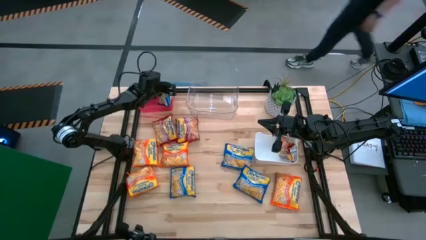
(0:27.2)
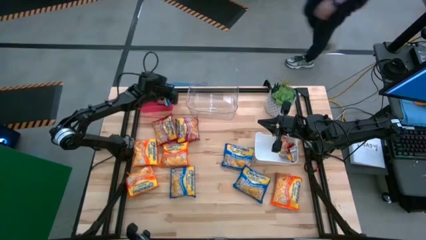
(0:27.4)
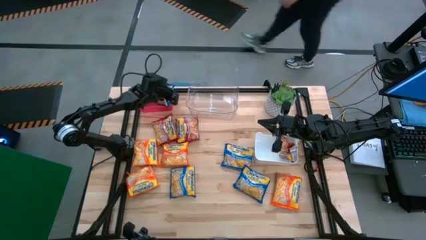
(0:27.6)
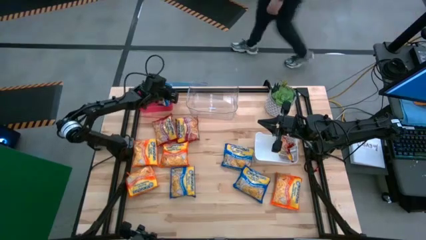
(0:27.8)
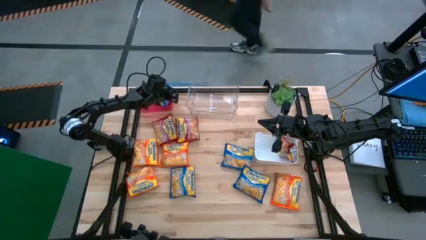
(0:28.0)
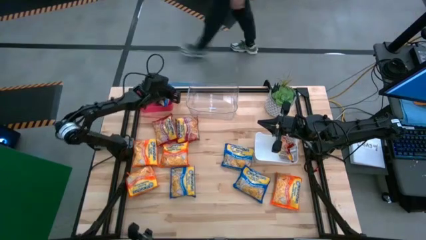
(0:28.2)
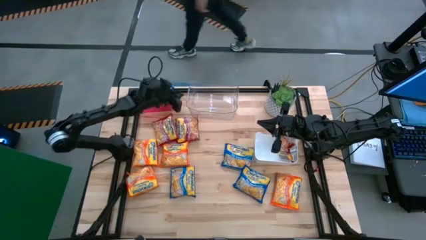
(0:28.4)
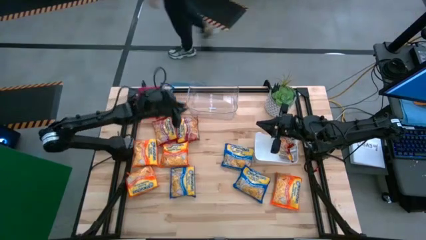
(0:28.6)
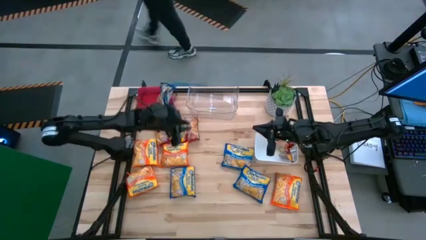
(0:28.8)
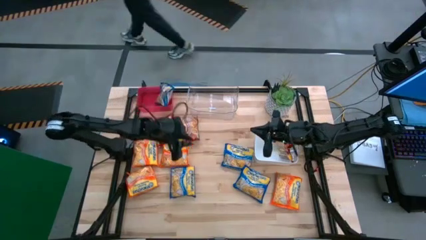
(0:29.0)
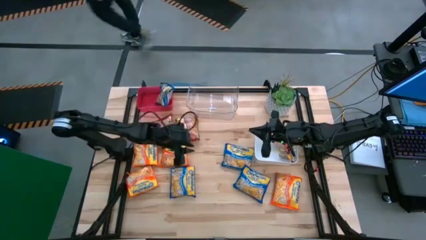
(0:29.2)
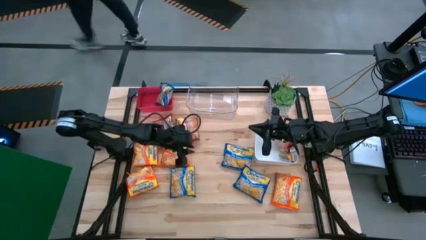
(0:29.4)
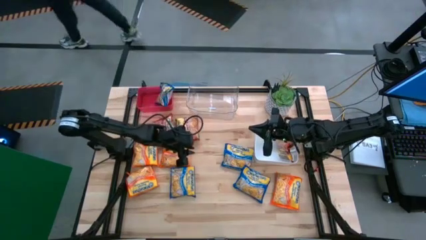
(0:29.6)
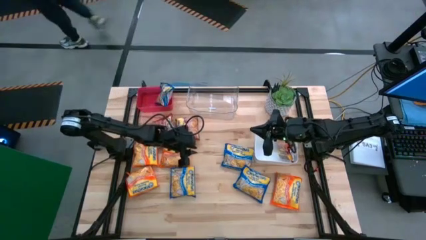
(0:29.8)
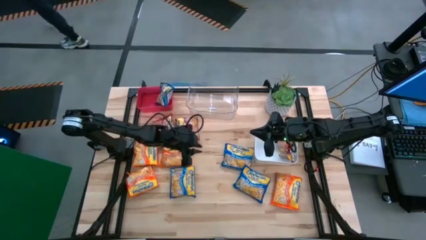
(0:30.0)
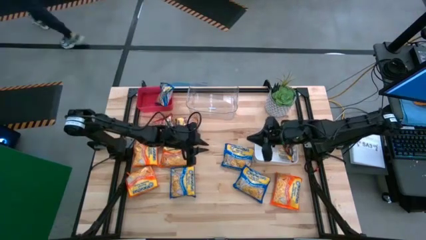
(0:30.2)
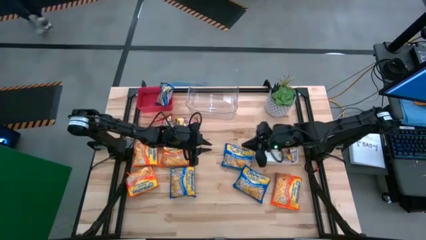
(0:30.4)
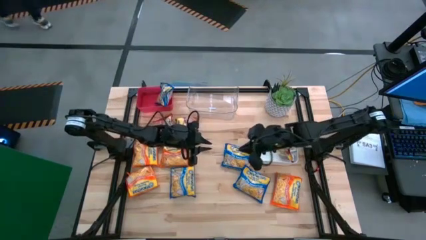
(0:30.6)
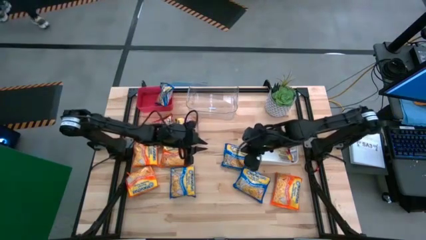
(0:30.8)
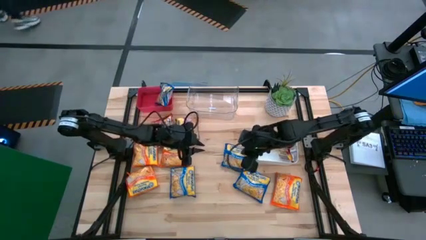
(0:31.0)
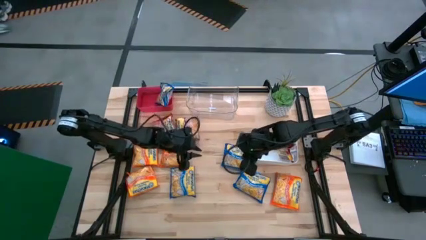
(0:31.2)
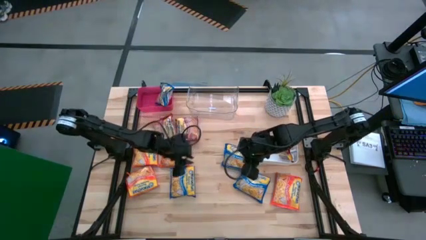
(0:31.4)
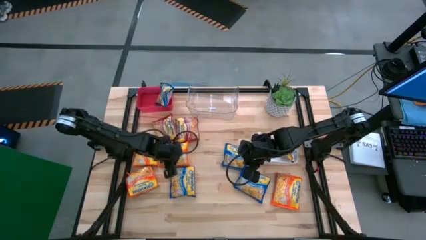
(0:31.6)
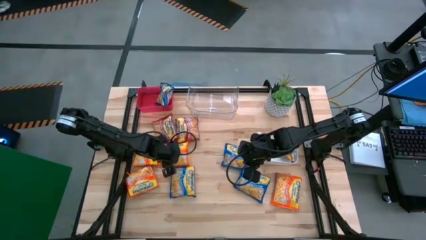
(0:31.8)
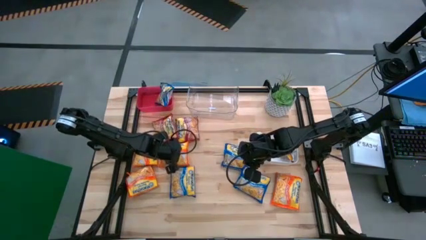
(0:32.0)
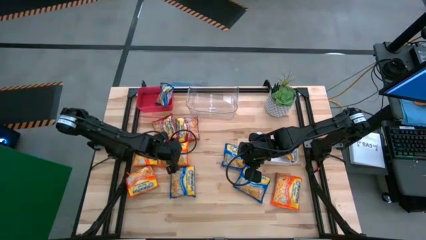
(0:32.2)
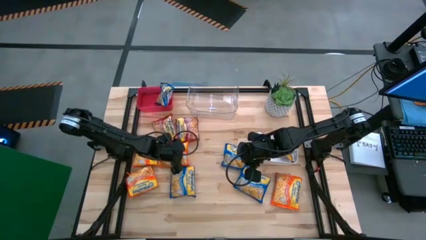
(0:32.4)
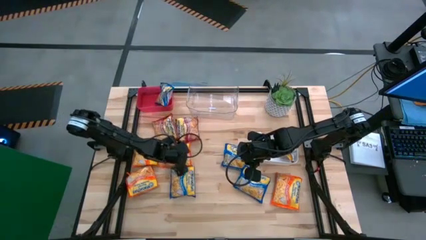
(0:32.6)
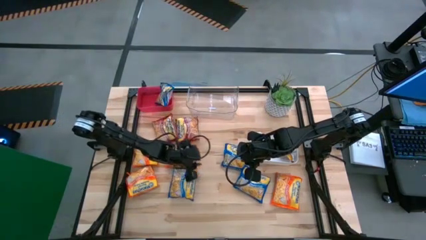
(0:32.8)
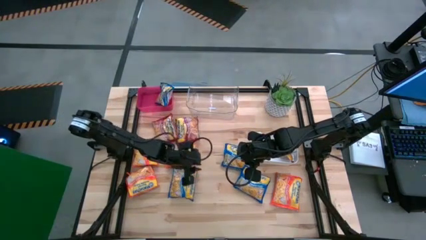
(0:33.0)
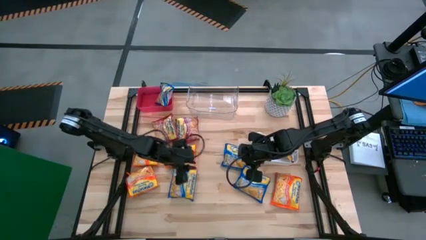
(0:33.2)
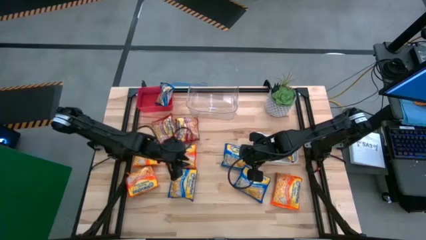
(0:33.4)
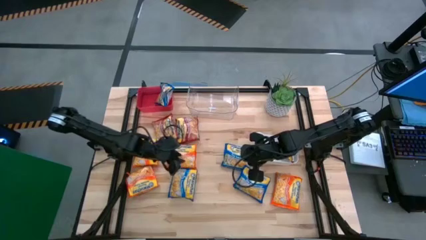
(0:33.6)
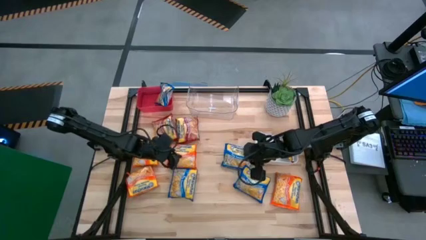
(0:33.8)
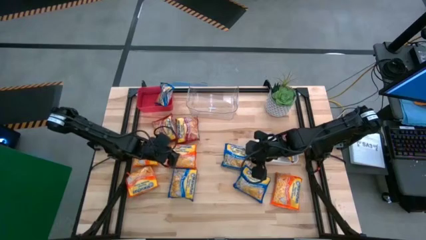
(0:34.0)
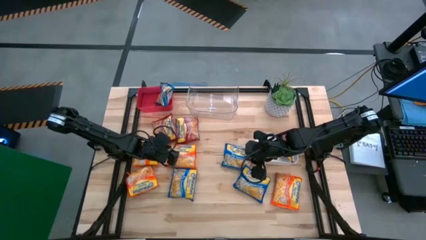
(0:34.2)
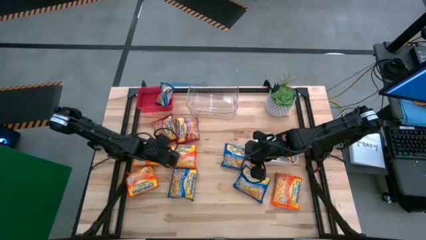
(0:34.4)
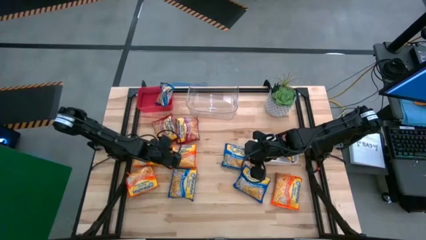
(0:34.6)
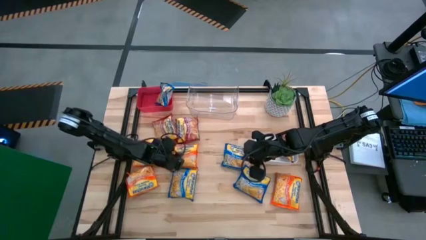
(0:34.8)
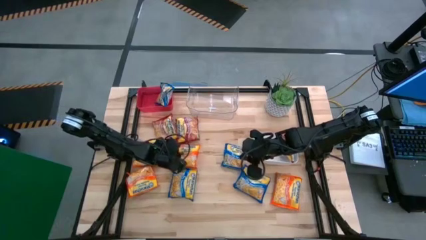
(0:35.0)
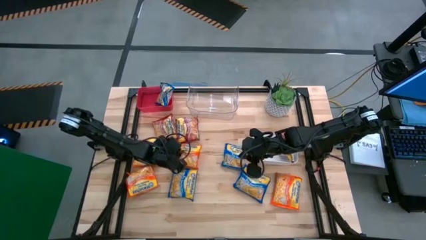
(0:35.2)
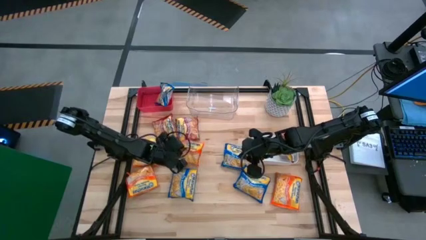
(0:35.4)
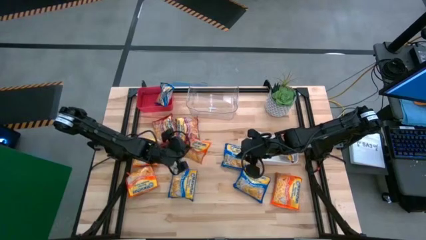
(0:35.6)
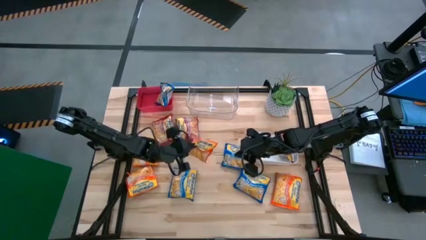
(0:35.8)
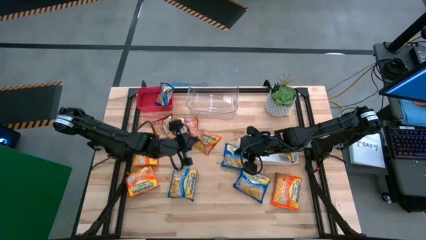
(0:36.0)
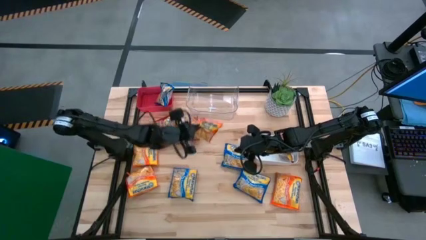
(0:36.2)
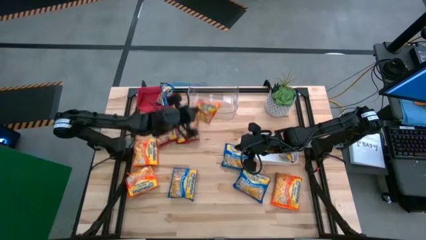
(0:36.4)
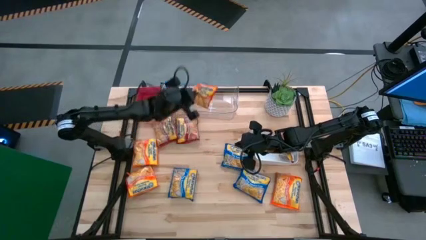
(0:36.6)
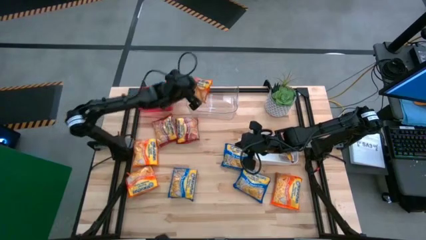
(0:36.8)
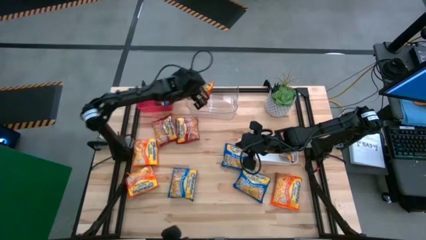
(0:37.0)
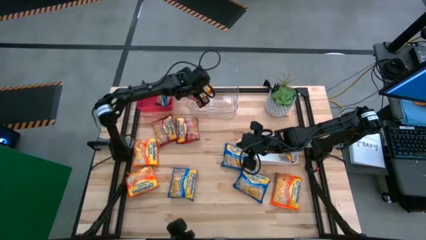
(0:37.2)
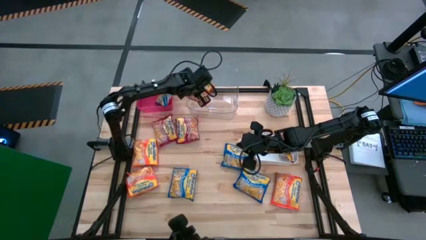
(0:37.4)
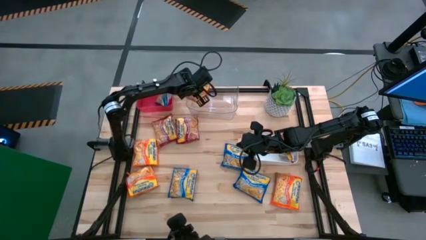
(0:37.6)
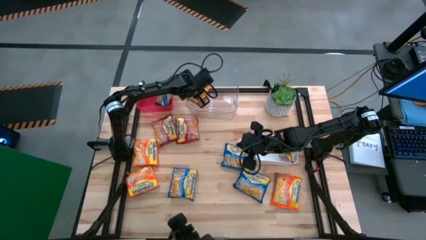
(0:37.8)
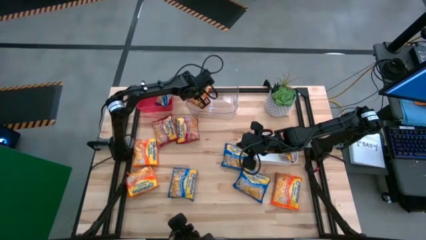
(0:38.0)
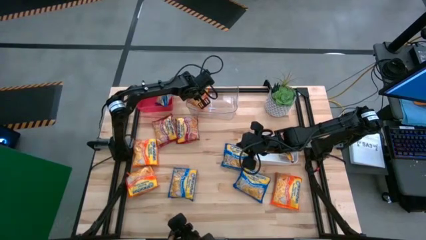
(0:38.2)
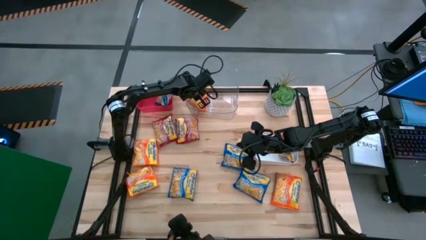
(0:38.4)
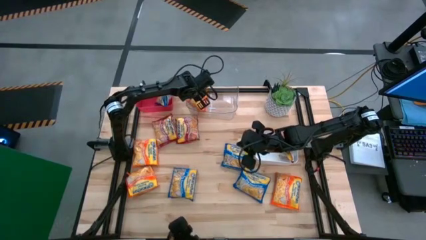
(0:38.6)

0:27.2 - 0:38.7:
Task: Sort Maruchan noodles
Put the orange noodle pack into the transparent bin
